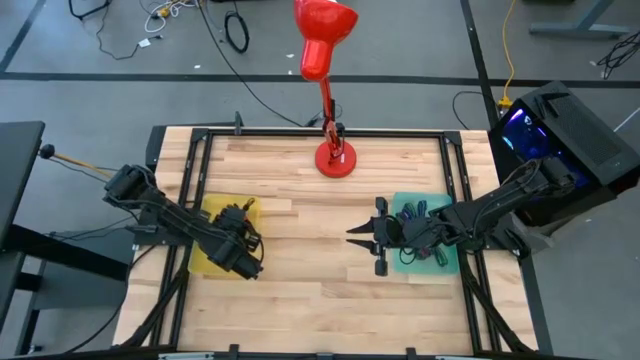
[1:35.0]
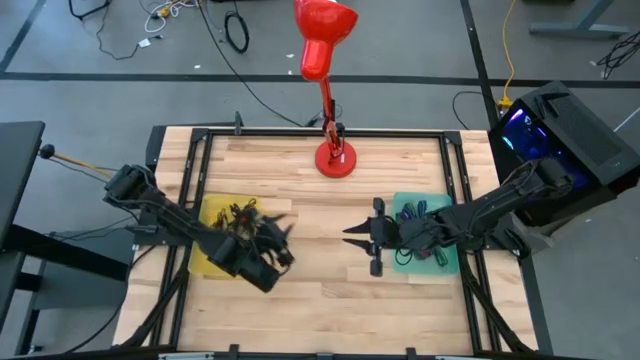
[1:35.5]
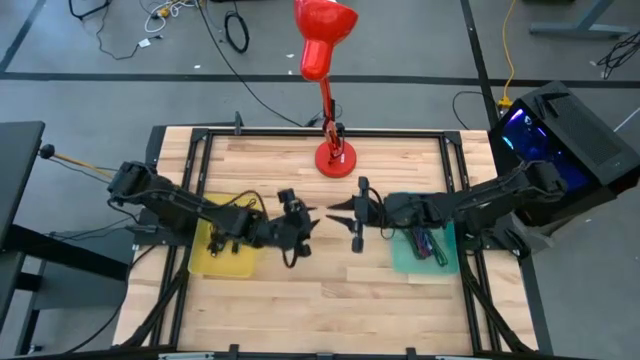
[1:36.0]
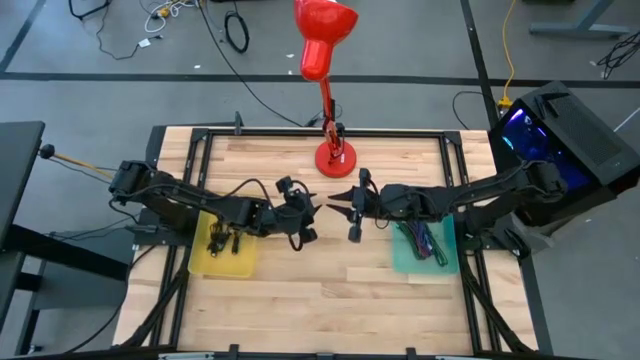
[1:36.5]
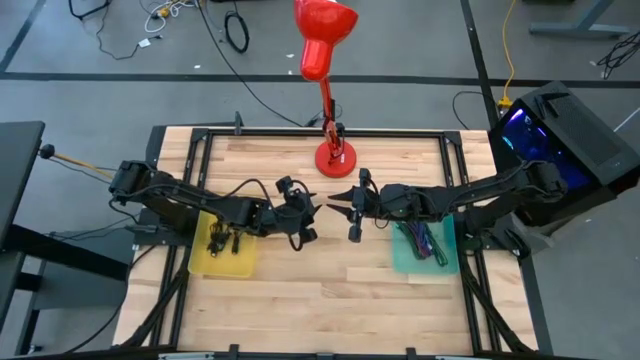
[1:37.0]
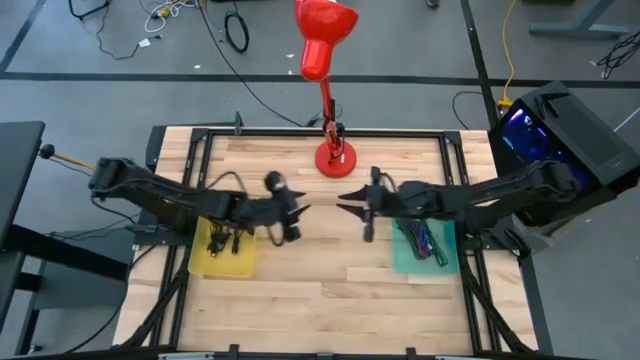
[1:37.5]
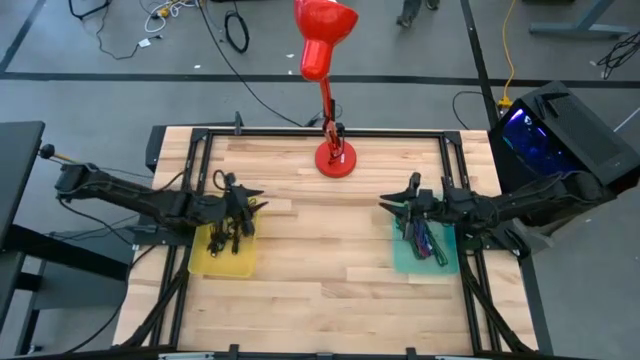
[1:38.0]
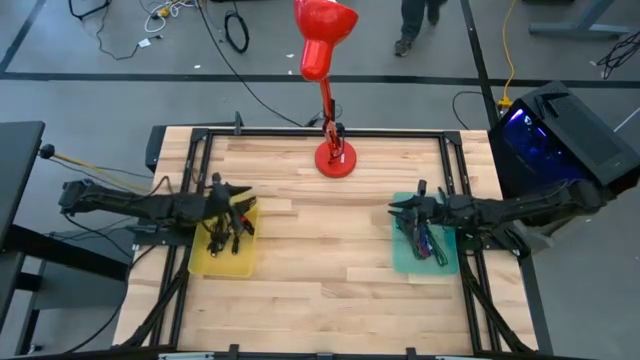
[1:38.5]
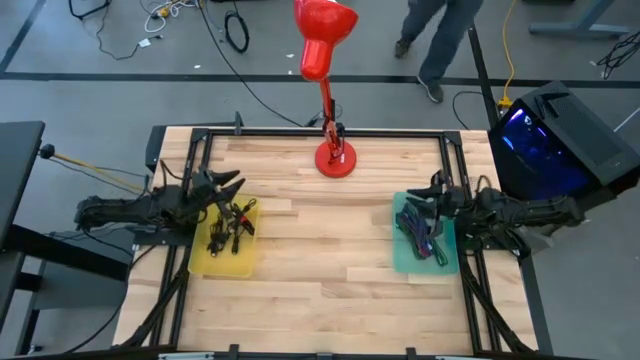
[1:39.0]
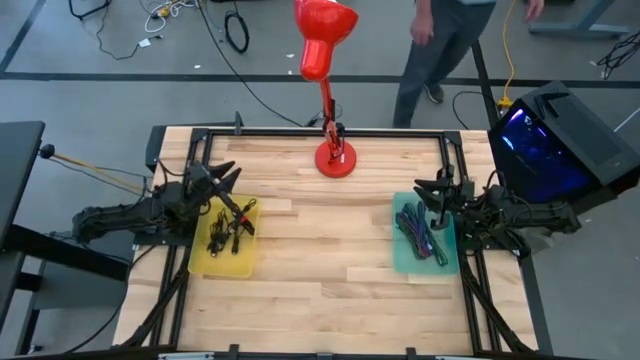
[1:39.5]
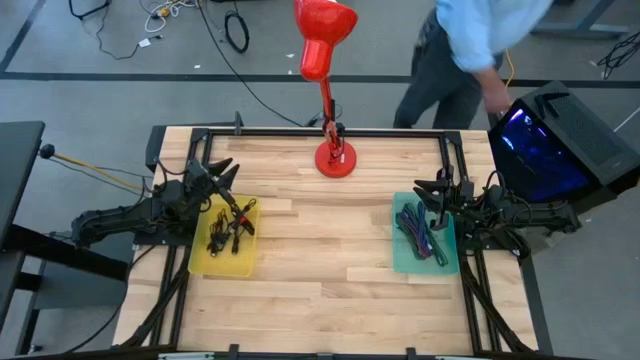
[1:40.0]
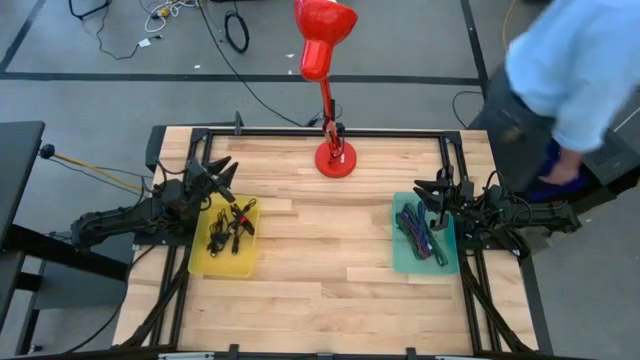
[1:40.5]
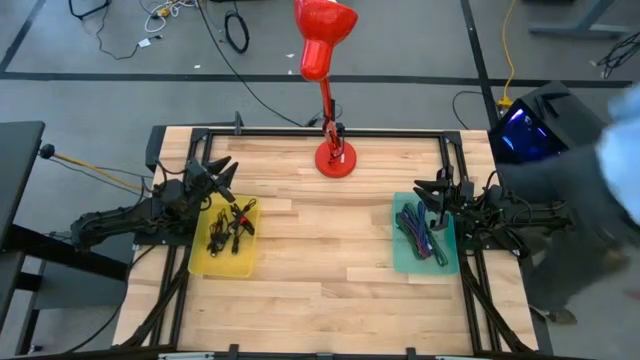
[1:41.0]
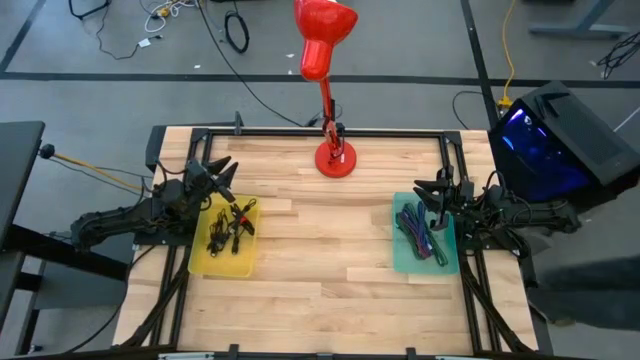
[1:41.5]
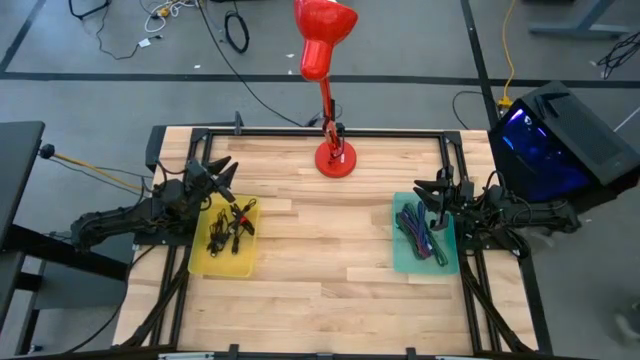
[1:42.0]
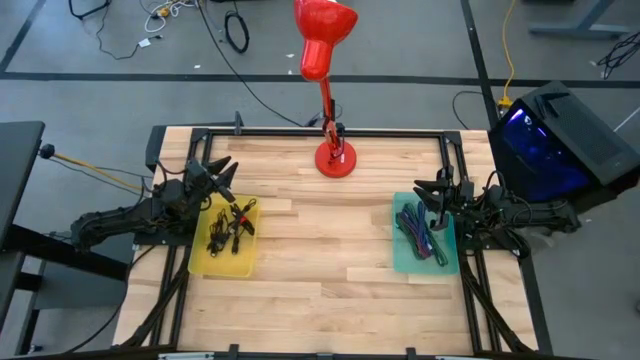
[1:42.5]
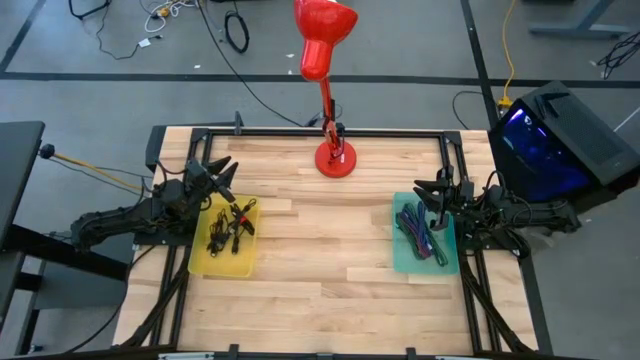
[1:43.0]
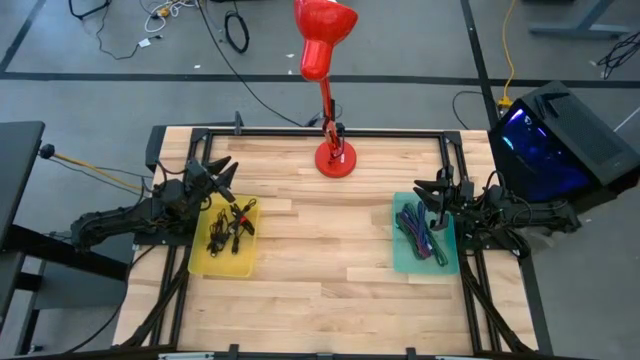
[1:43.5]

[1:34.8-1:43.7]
Task: Pick & Place USB Port
Return to Home Position

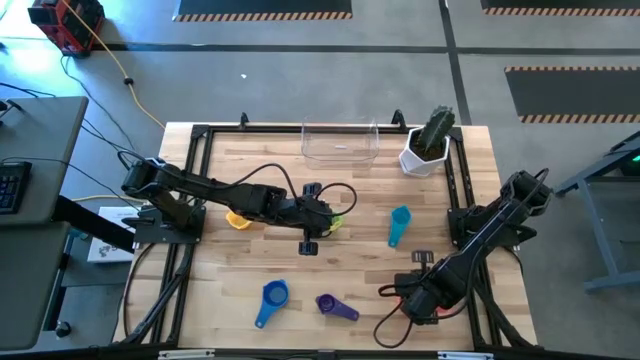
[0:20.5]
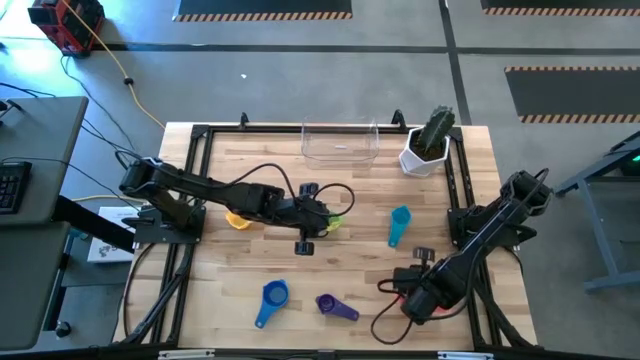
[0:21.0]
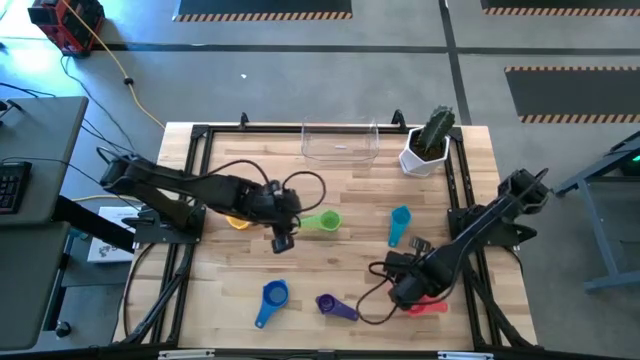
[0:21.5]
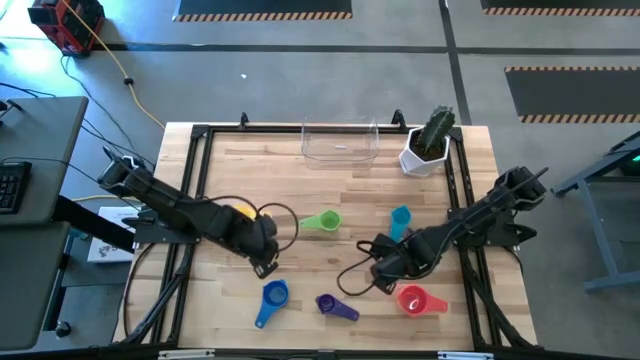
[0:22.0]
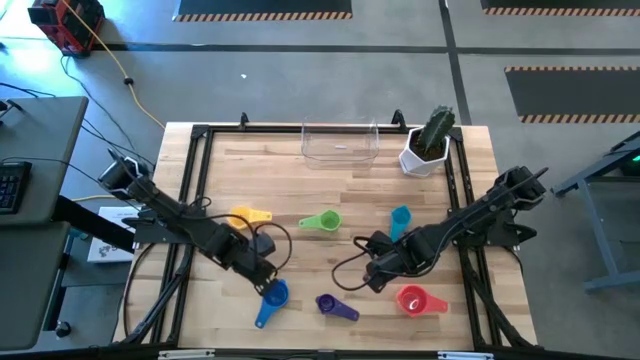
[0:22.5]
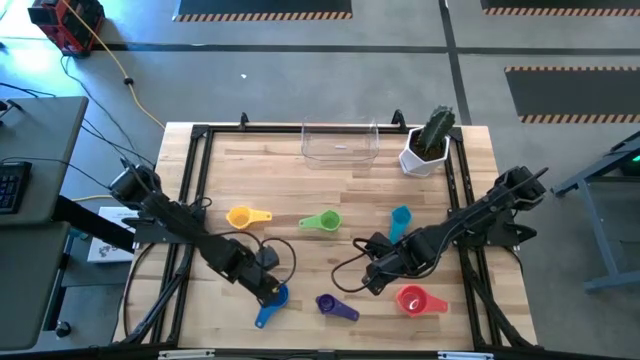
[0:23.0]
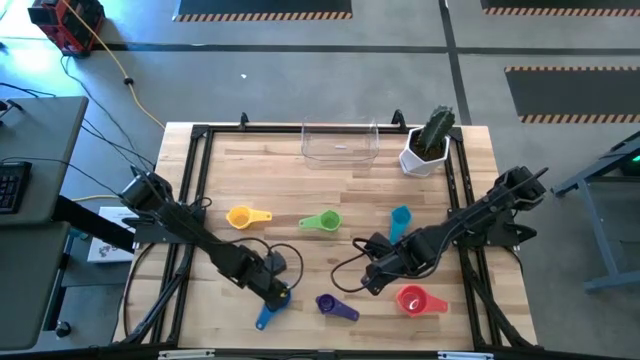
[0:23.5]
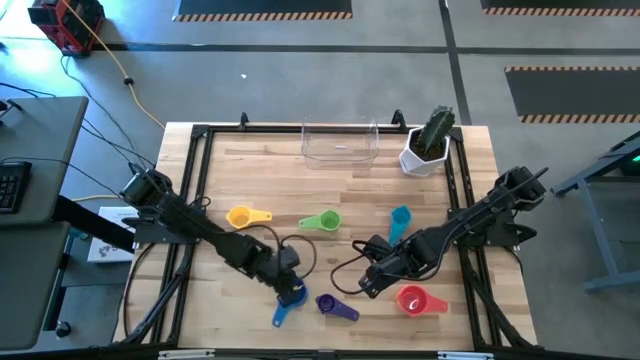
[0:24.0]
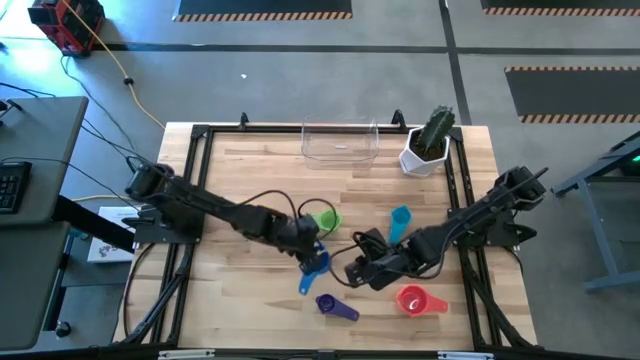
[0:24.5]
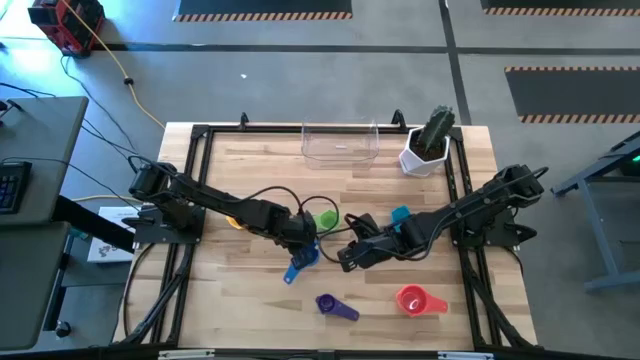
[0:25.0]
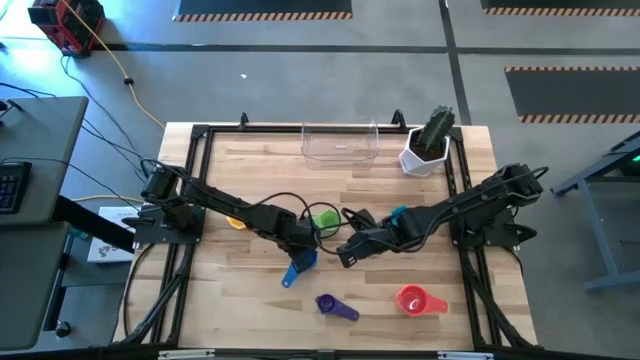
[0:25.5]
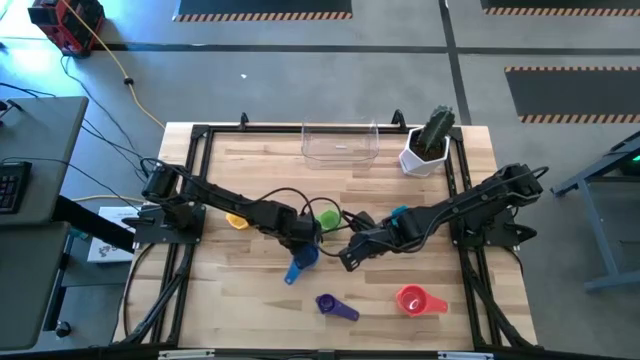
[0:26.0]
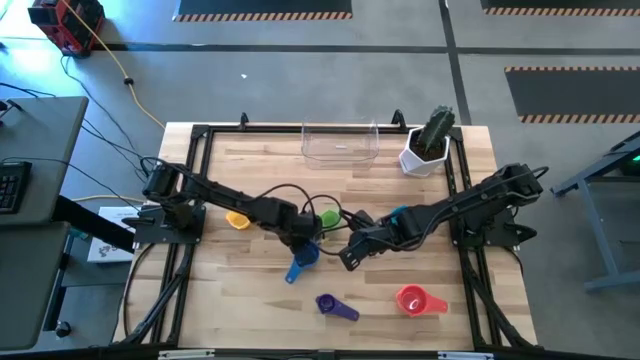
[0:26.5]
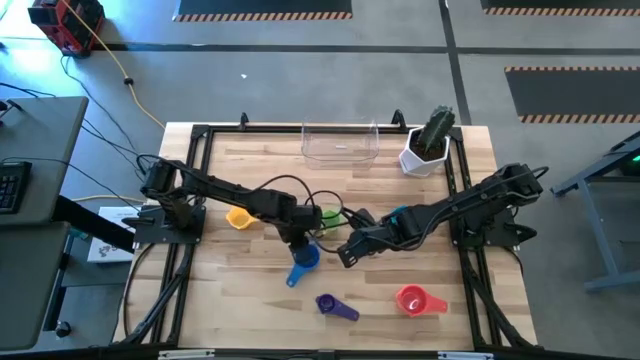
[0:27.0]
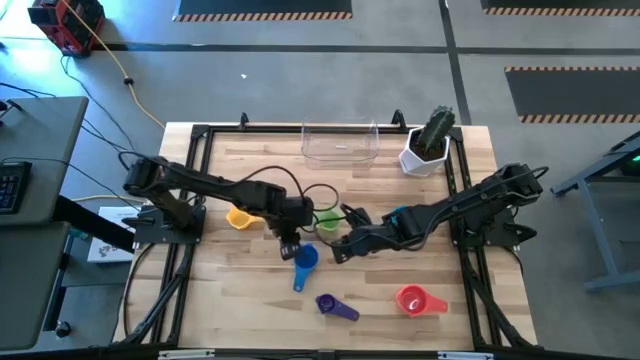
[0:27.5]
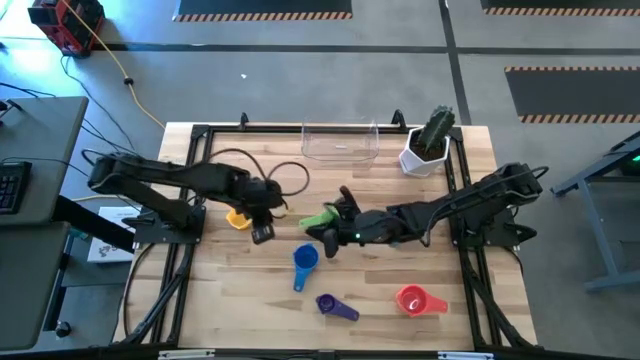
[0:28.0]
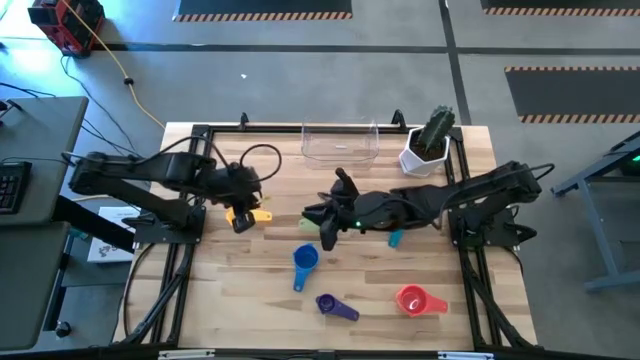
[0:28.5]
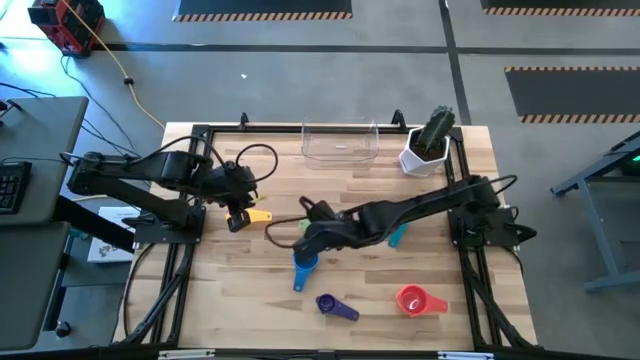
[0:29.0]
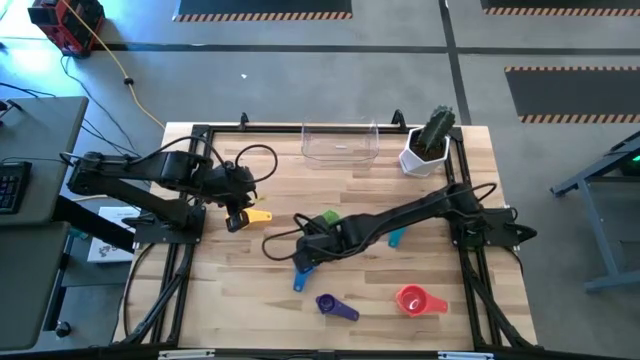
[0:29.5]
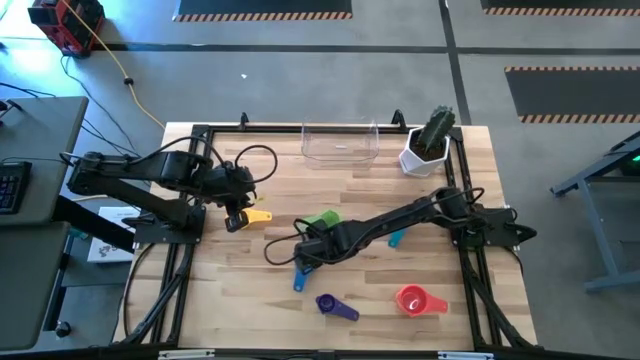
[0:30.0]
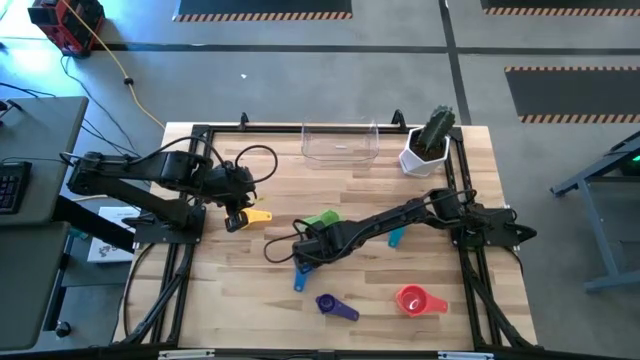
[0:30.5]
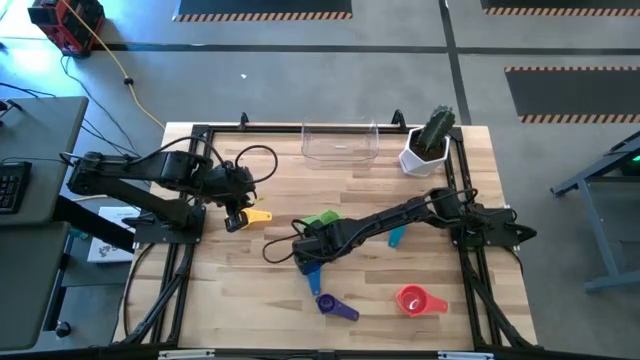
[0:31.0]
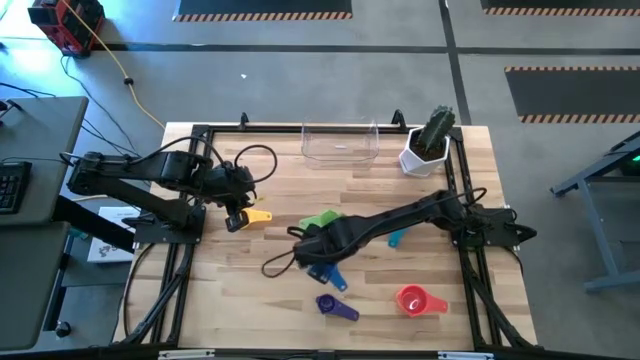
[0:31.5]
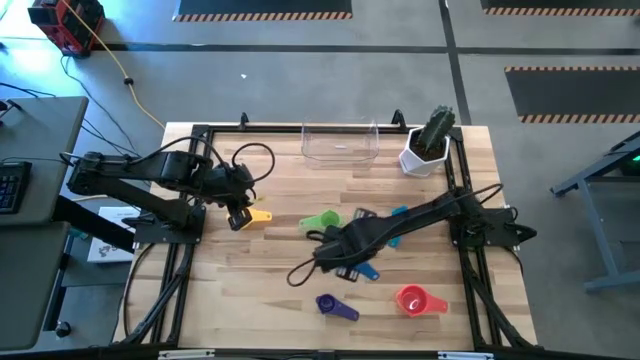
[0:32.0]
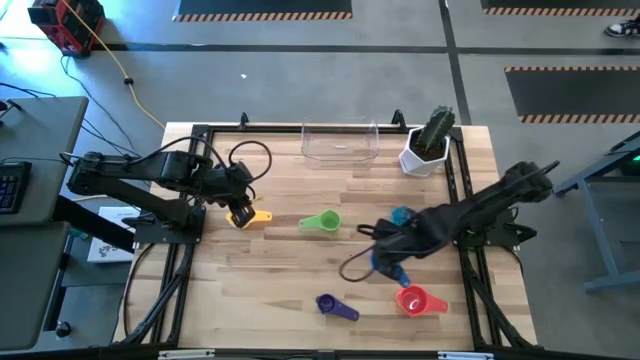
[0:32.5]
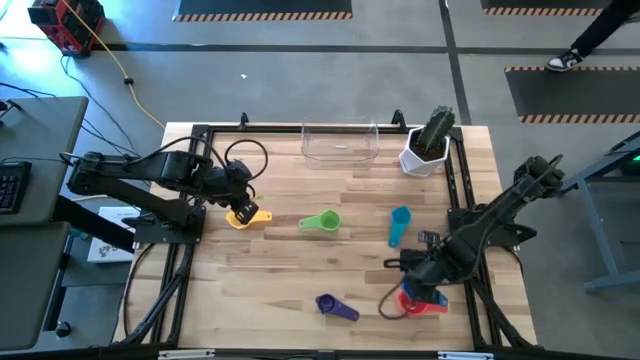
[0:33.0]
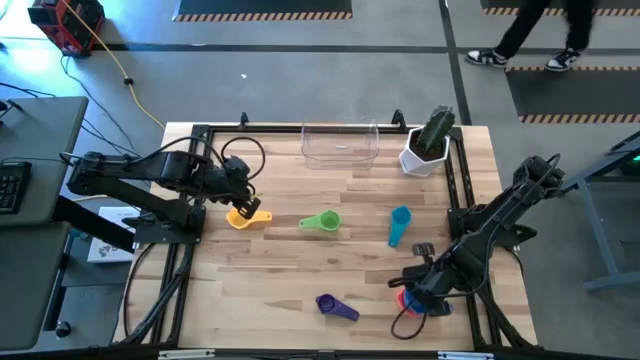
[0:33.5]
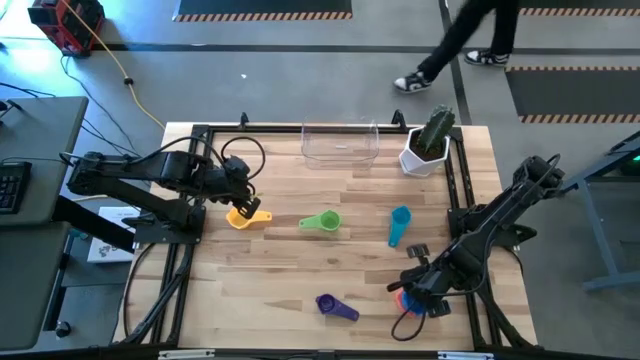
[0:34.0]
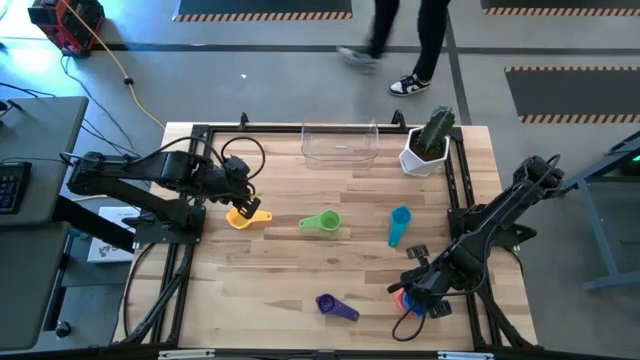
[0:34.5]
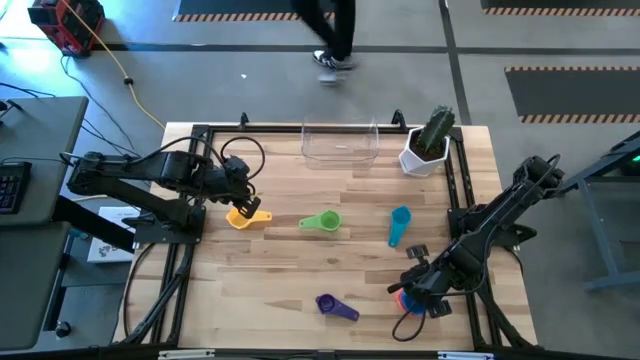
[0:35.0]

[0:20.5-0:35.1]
Task: Nest measuring cups in basket
Stack the blue measuring cup on the top of the red measuring cup
